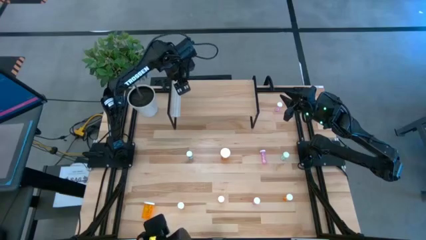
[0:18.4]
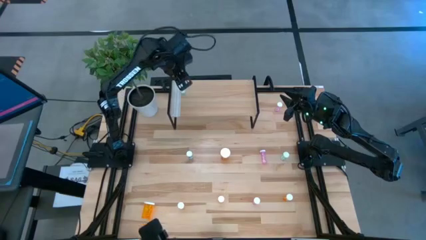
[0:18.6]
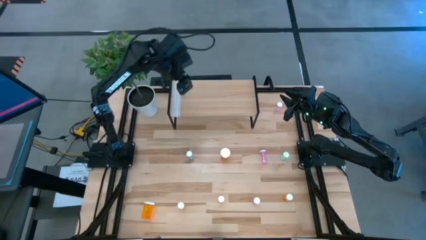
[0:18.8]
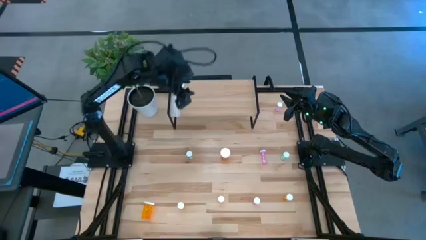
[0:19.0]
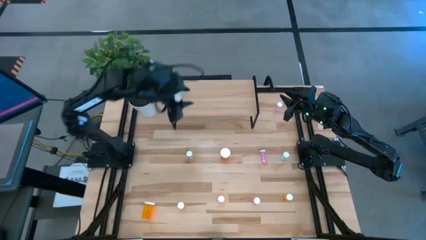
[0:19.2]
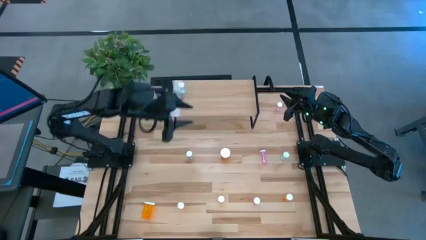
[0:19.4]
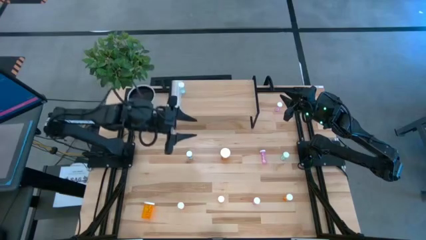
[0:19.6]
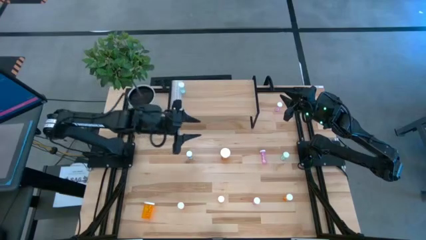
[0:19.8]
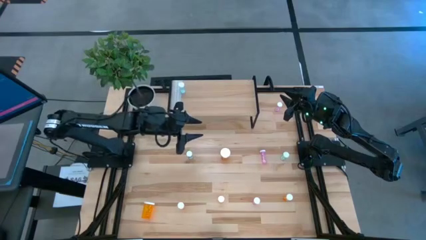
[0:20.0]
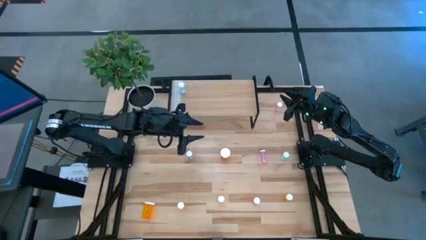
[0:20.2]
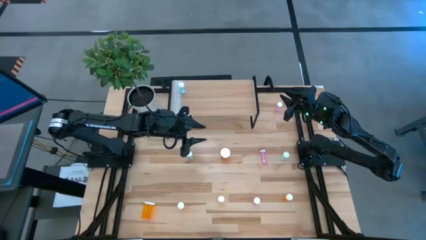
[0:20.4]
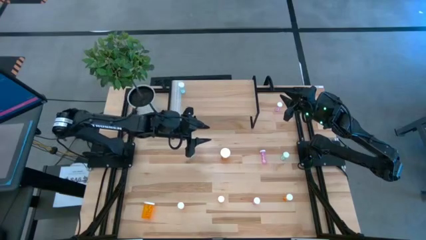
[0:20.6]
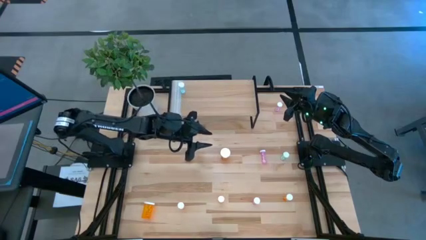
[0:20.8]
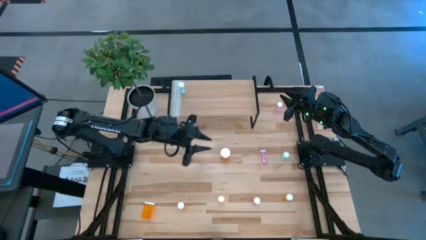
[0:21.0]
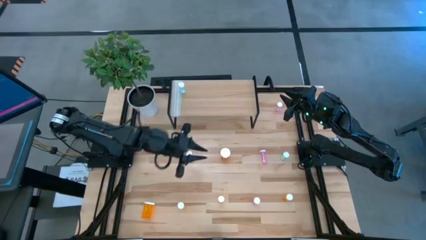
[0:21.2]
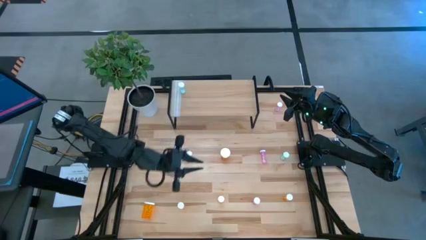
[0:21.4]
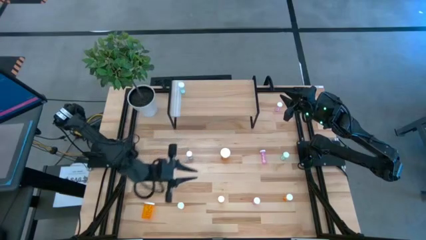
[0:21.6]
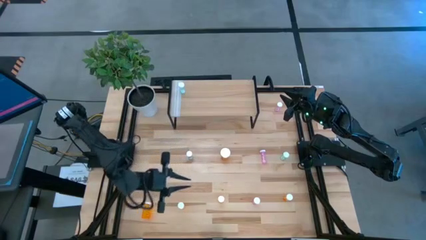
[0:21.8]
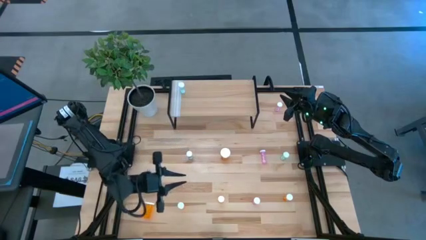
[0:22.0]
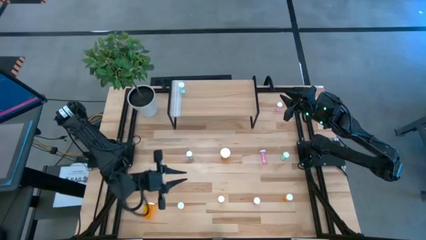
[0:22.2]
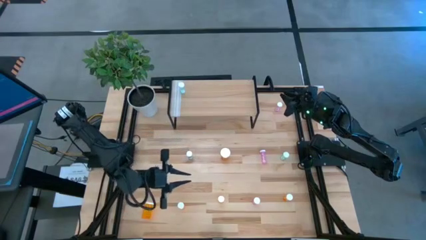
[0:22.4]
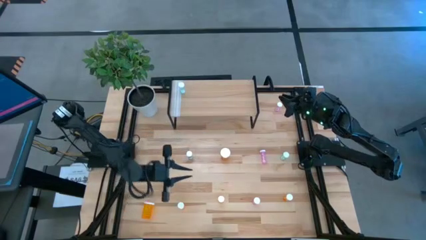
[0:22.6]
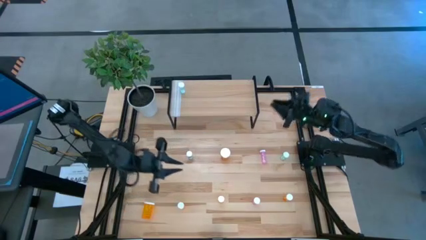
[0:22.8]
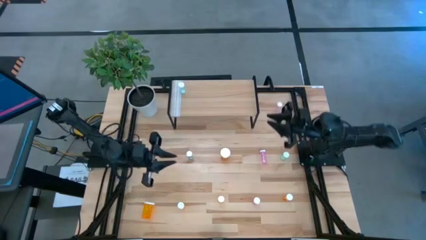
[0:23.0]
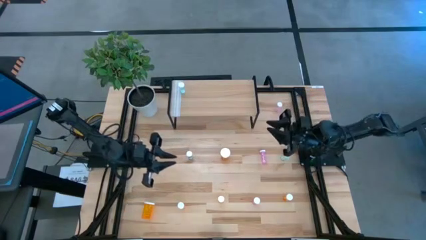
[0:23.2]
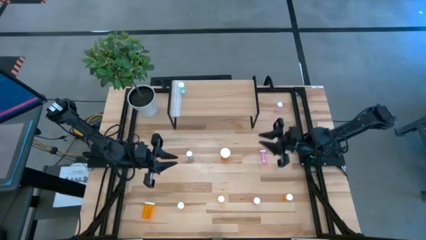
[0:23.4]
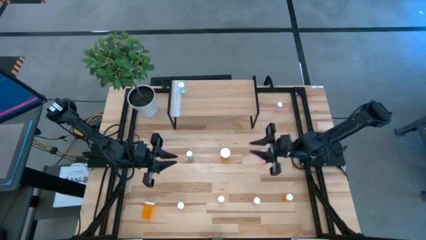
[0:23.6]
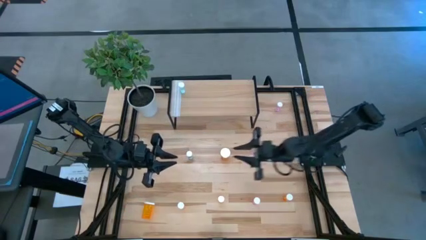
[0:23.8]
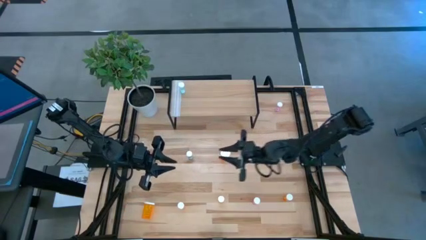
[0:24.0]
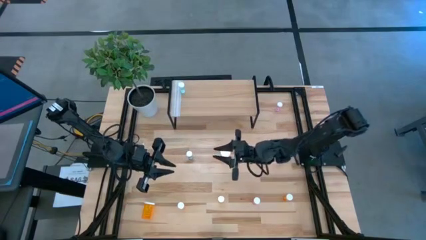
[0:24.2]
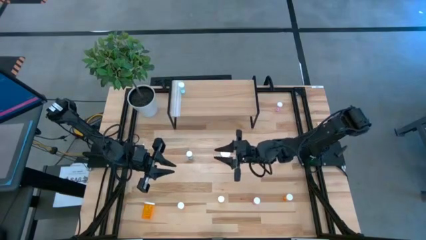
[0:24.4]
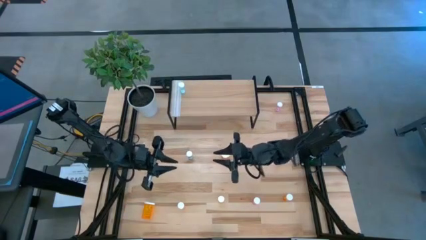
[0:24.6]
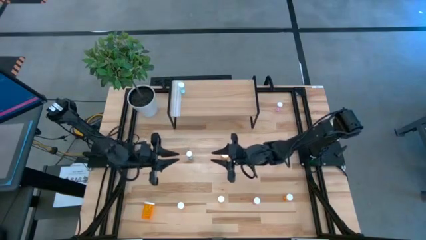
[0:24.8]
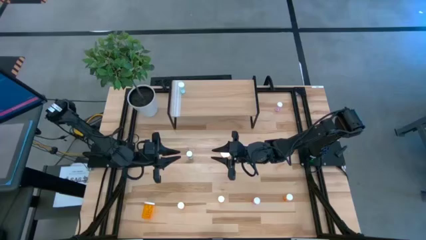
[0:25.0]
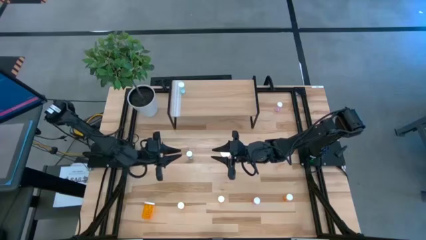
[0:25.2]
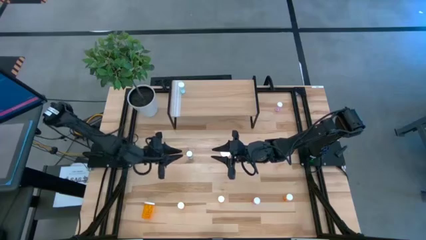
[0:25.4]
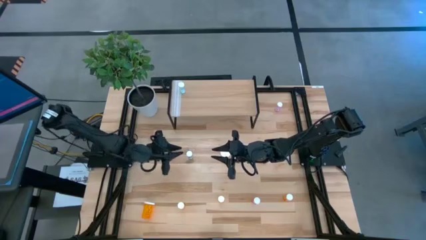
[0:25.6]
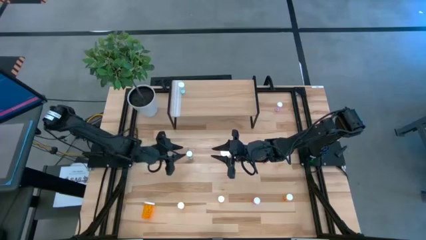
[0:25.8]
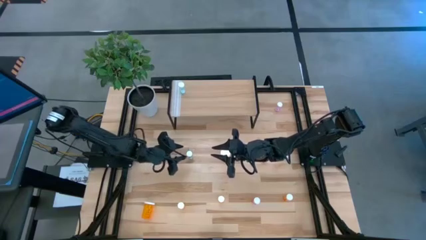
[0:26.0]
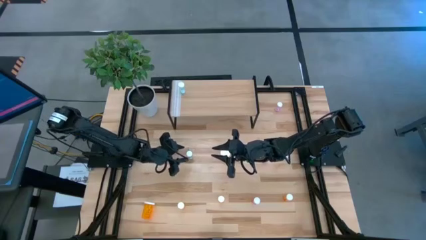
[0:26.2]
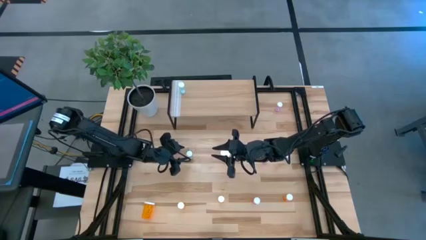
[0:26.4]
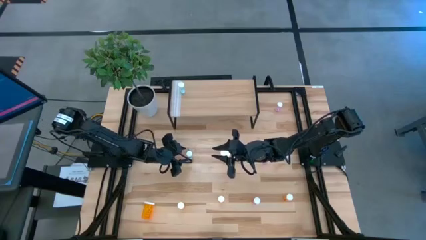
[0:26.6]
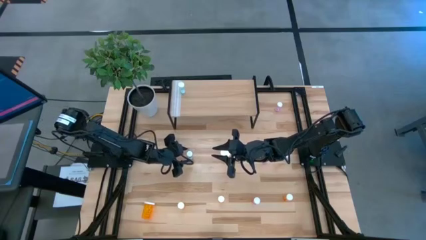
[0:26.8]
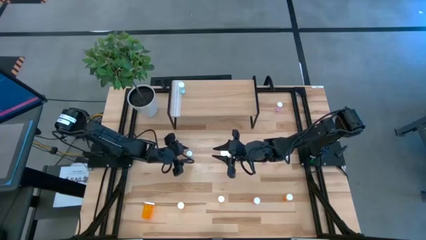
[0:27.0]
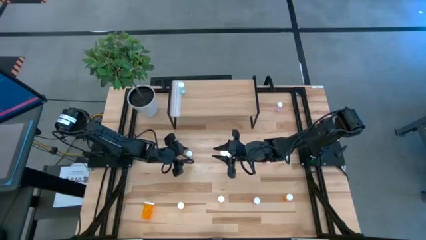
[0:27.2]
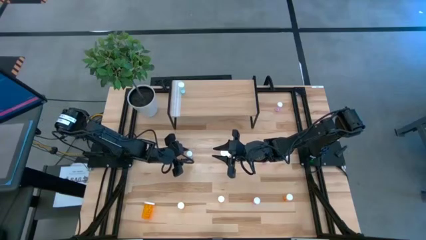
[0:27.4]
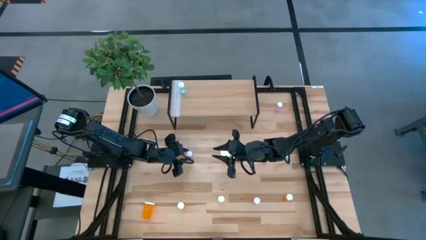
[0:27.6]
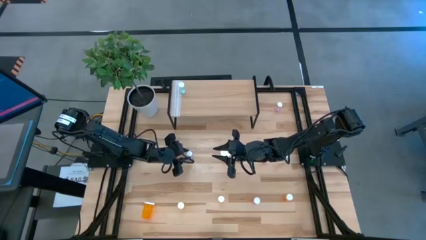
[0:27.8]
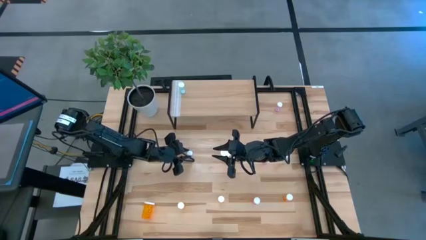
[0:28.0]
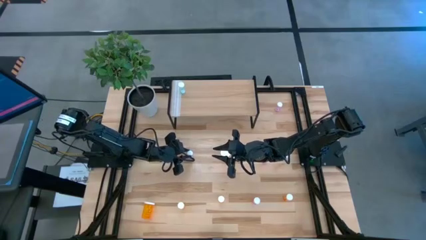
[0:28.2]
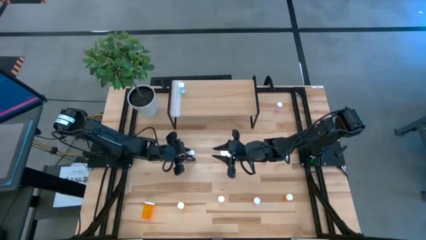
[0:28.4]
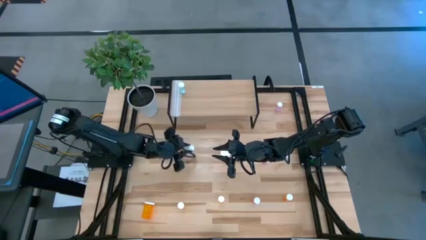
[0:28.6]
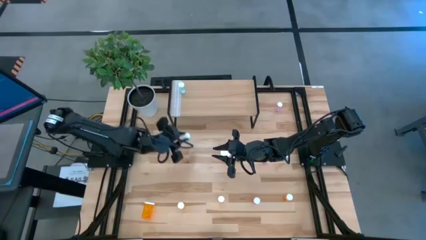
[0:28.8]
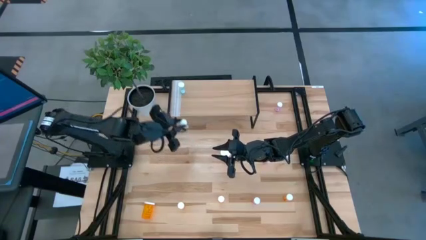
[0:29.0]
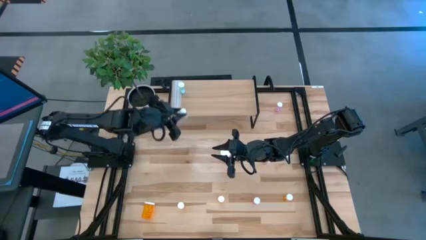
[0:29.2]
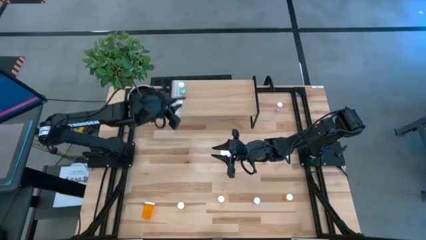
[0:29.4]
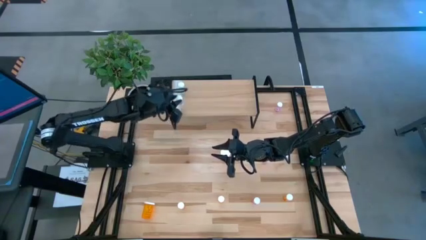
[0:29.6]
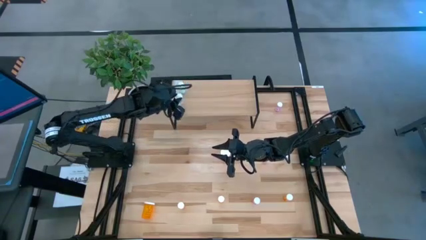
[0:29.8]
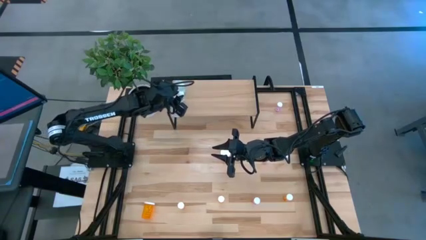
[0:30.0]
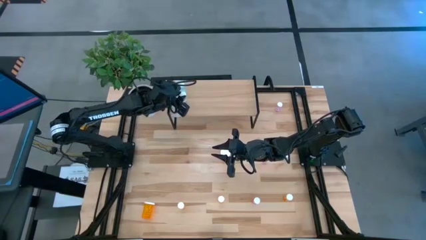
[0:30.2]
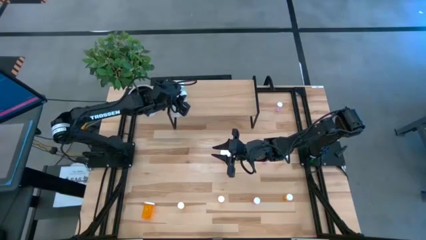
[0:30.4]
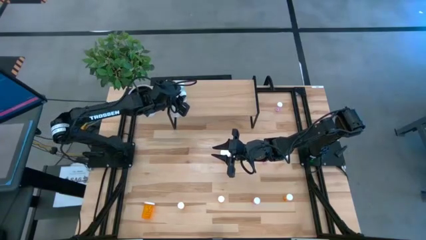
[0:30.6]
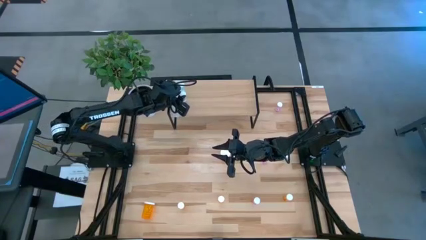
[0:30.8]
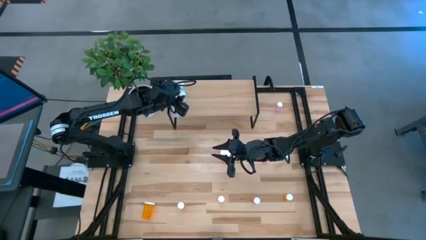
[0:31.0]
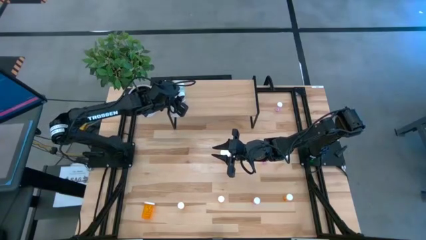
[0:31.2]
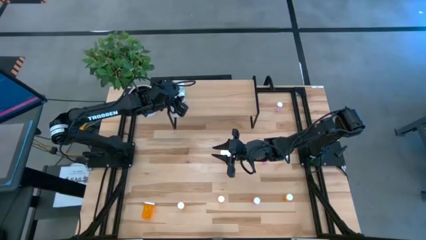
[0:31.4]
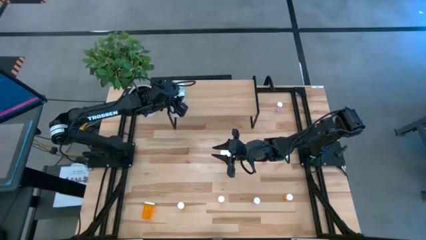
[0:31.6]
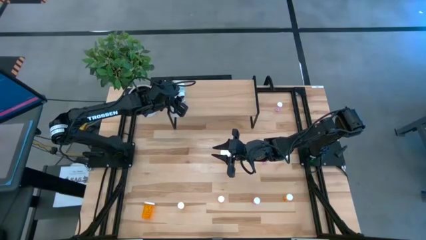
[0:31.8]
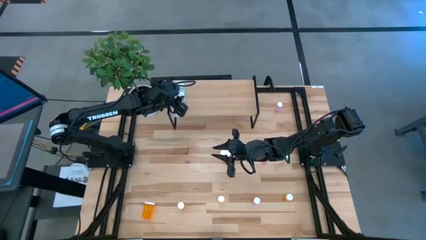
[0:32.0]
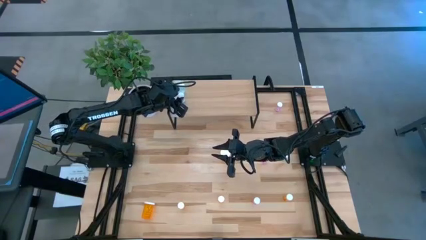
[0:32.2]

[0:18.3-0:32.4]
Task: Pick and place medicine bottles onto shelf by color
Put the left blue pill bottle on the shelf aligned with the other blue pill bottle
